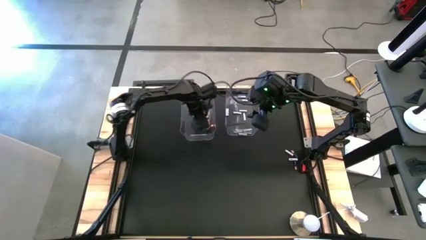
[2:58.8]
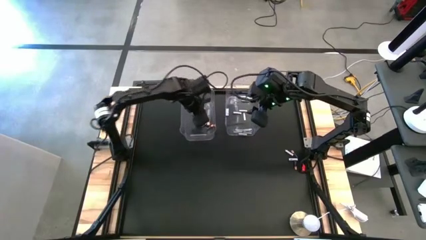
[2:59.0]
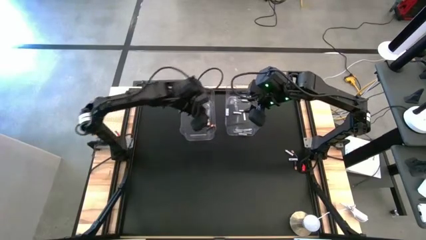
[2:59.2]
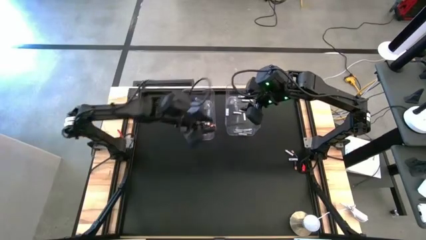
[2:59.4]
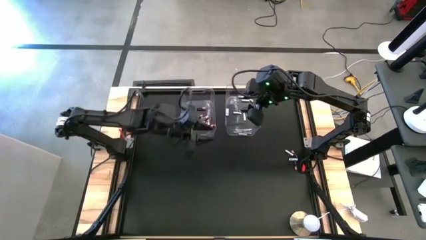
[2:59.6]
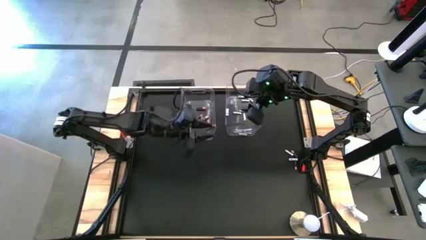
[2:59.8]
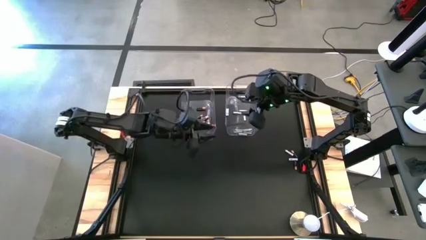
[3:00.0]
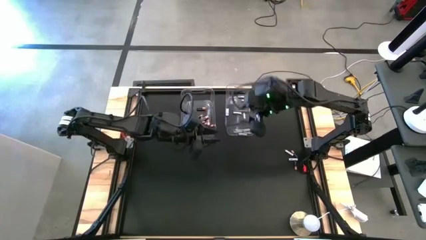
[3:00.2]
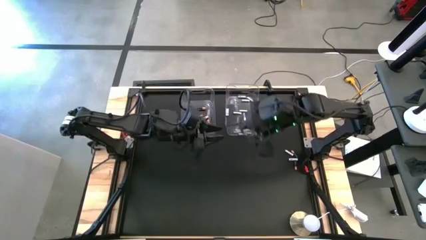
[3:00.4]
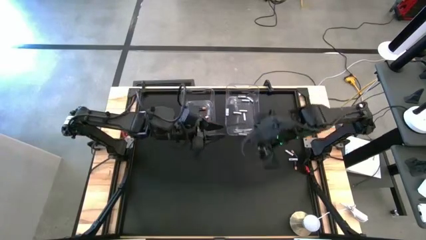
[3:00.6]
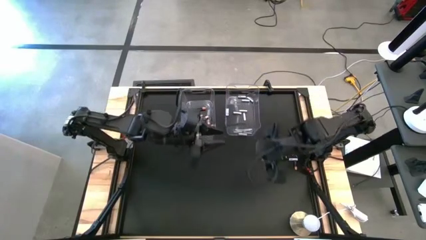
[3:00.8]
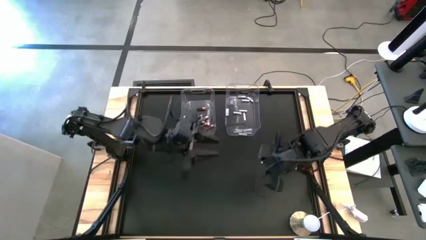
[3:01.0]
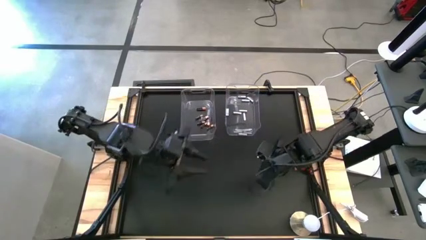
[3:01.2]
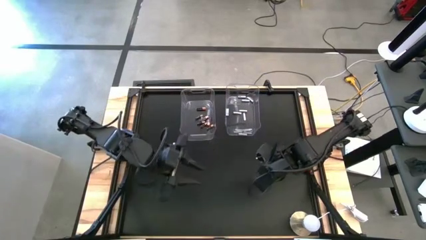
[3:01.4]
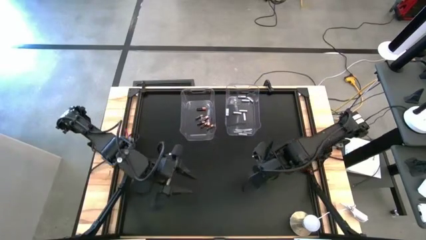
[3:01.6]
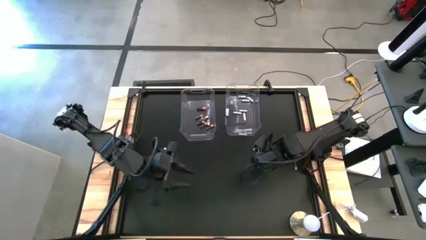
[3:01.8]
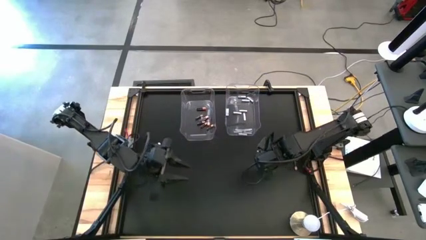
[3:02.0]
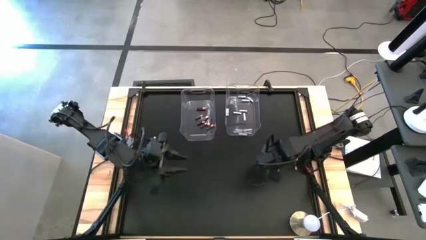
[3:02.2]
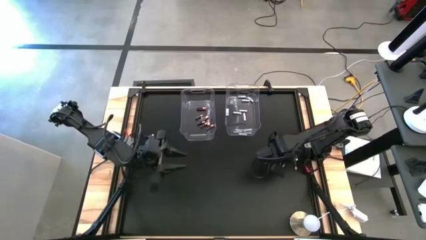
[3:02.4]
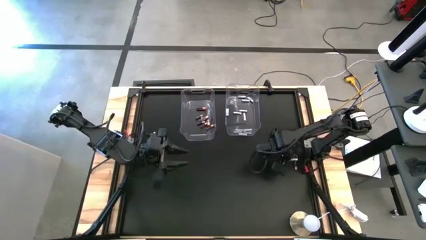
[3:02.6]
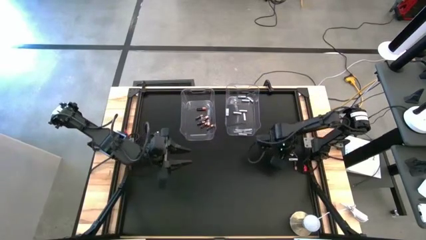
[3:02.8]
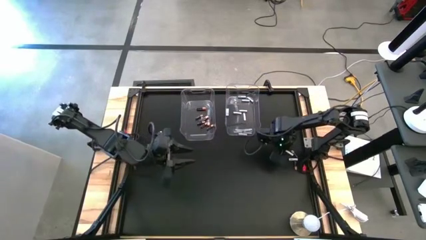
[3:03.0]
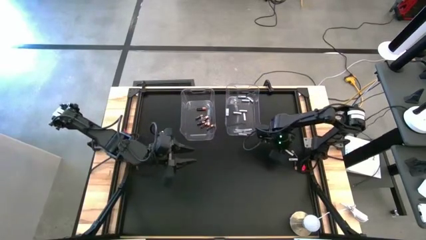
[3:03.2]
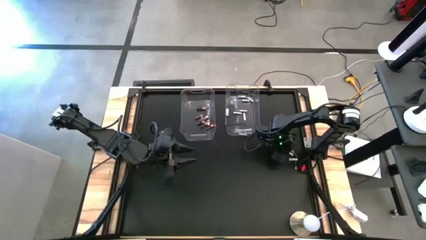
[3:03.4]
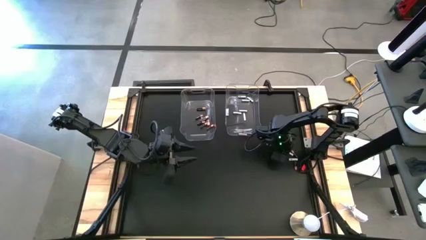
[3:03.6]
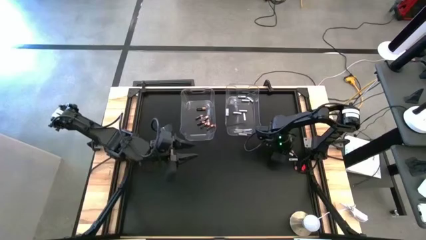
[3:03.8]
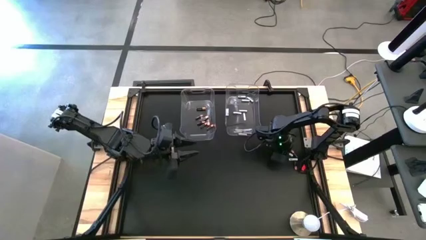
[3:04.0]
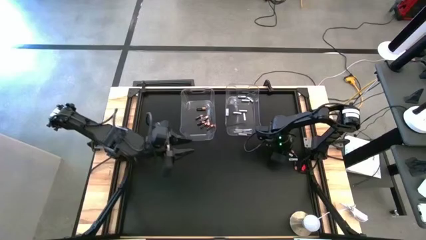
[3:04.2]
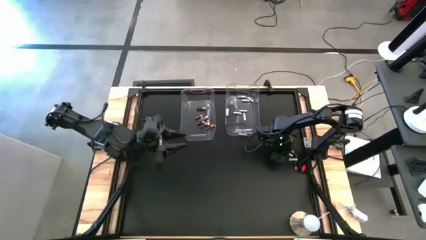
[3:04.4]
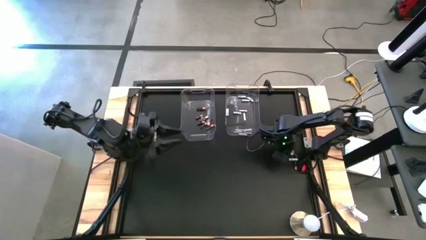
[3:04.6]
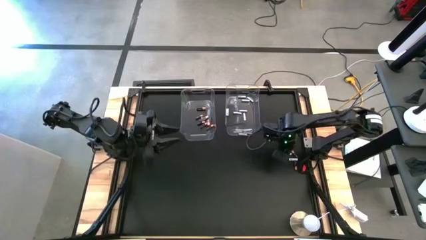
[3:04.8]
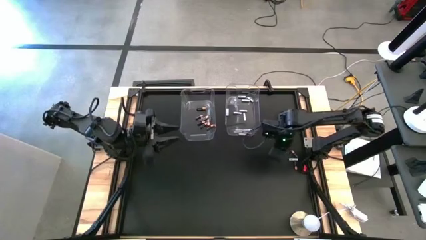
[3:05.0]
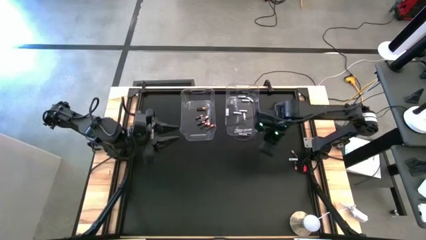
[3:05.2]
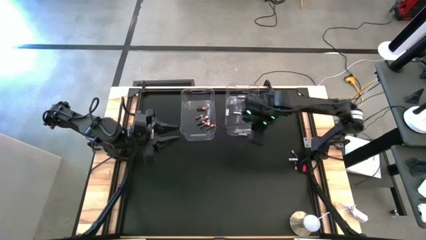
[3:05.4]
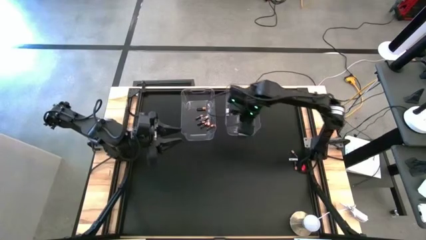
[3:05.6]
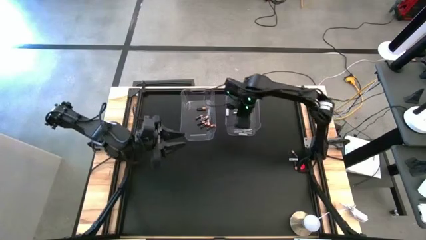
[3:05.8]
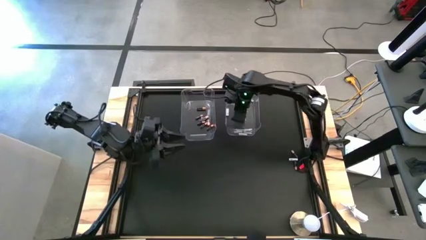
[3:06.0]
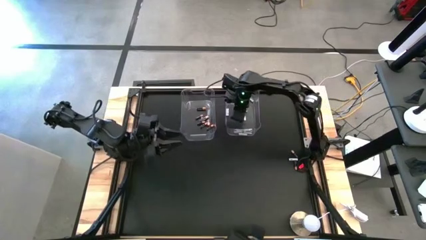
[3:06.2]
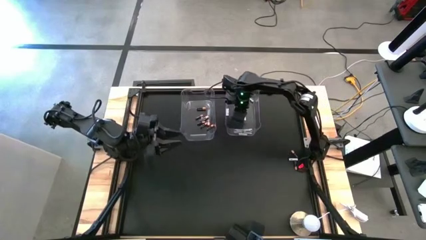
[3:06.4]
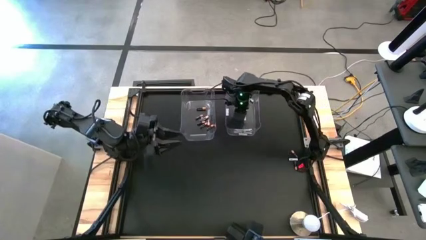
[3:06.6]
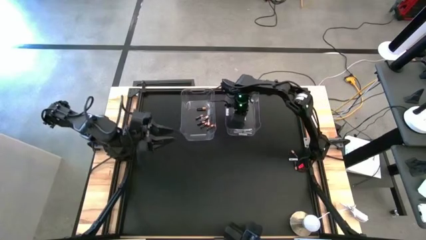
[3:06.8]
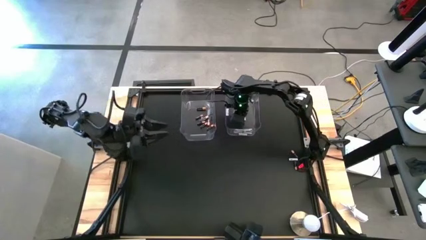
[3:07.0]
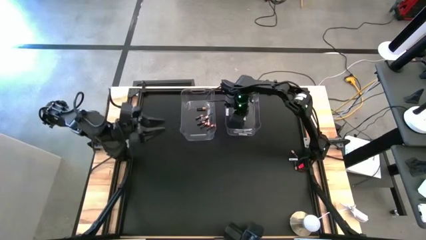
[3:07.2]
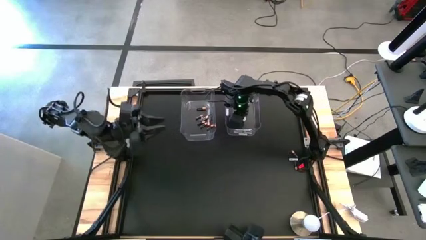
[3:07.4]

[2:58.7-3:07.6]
Task: Sort batteries
Put the white battery into the right transparent bin

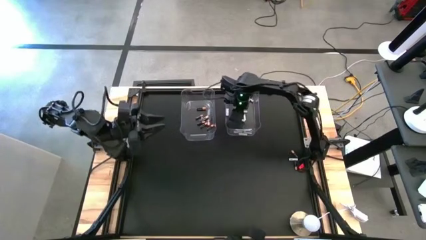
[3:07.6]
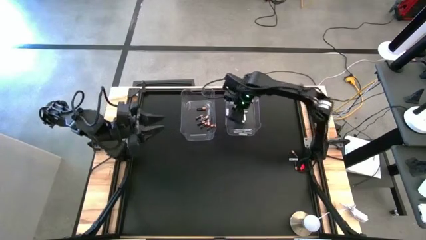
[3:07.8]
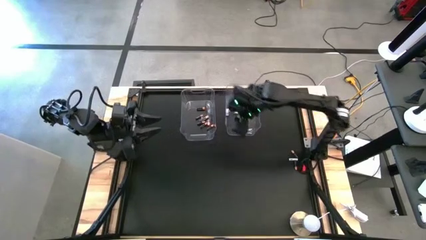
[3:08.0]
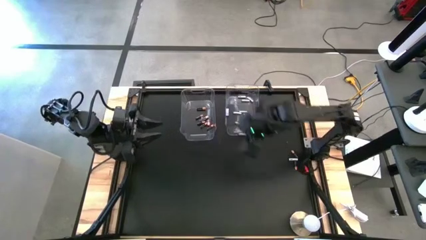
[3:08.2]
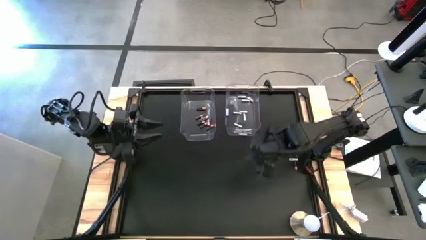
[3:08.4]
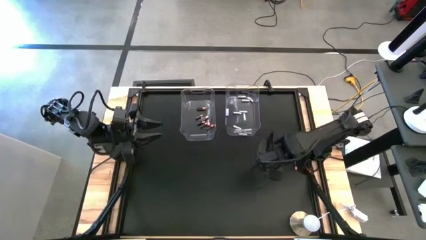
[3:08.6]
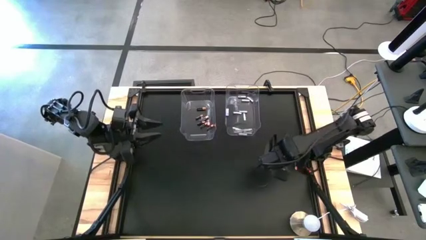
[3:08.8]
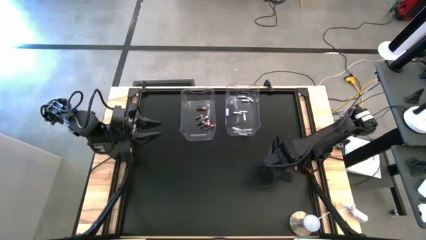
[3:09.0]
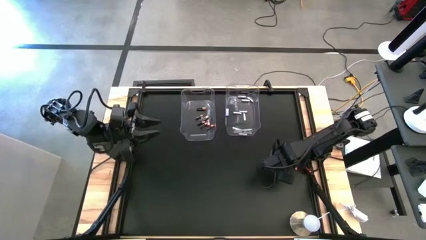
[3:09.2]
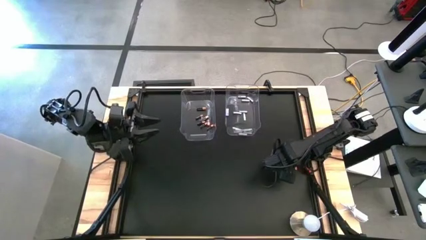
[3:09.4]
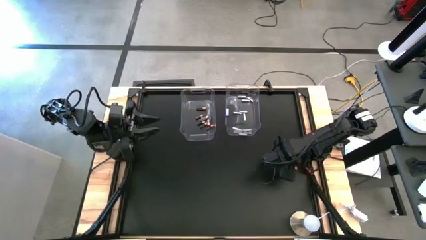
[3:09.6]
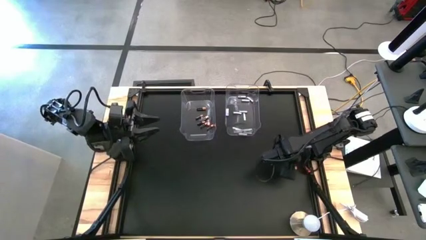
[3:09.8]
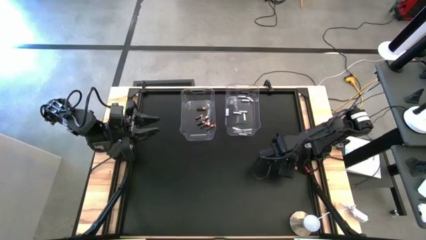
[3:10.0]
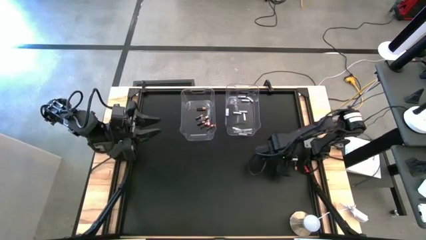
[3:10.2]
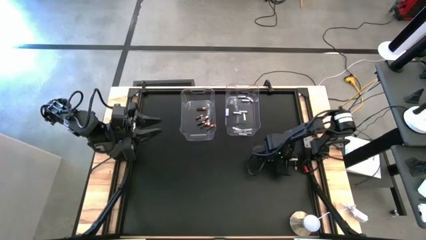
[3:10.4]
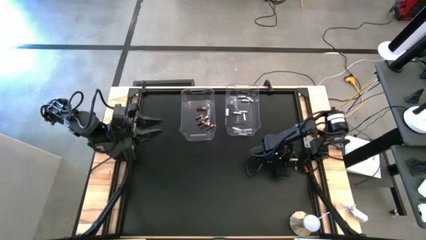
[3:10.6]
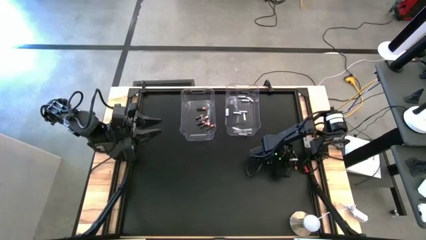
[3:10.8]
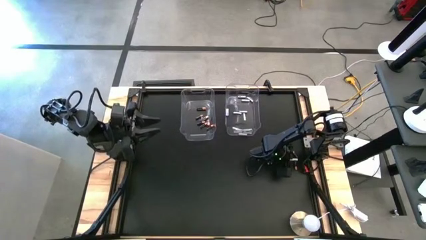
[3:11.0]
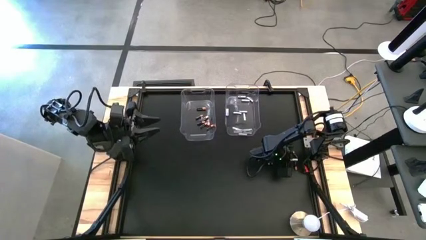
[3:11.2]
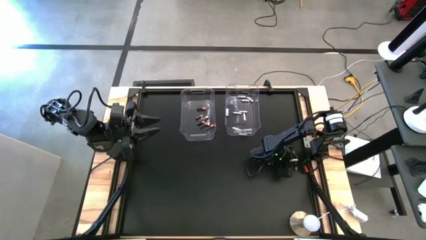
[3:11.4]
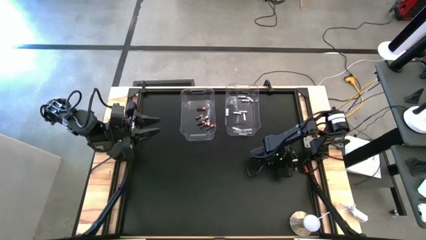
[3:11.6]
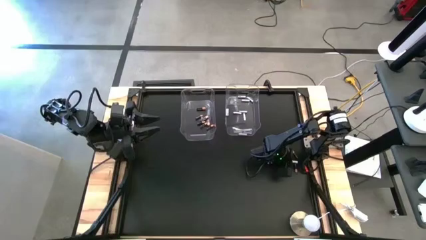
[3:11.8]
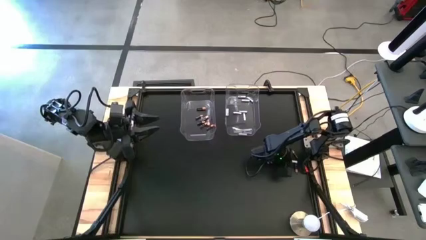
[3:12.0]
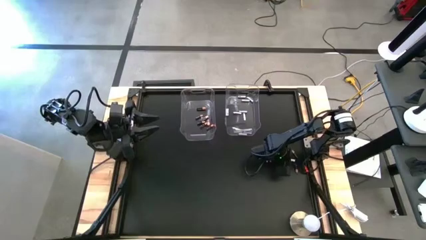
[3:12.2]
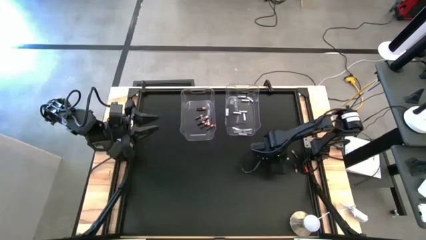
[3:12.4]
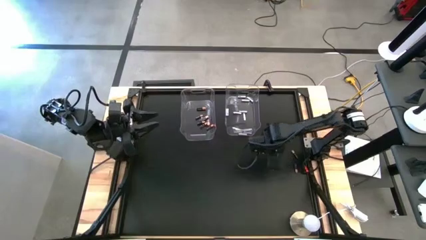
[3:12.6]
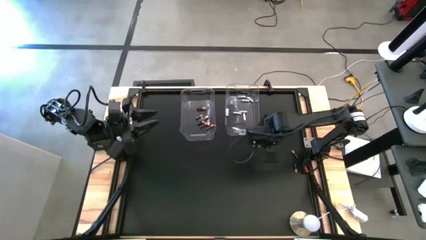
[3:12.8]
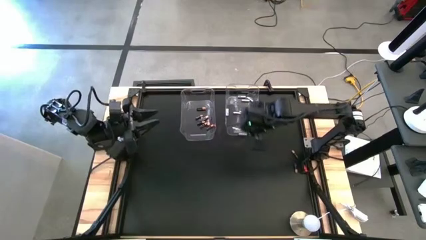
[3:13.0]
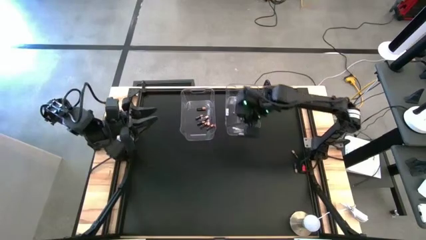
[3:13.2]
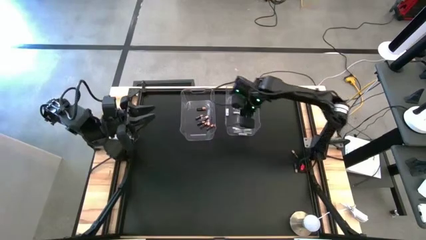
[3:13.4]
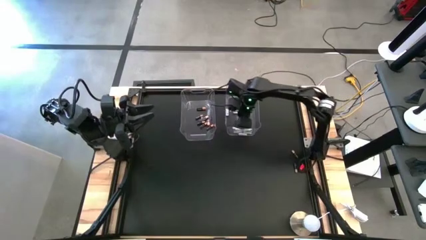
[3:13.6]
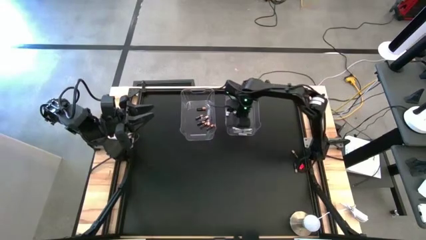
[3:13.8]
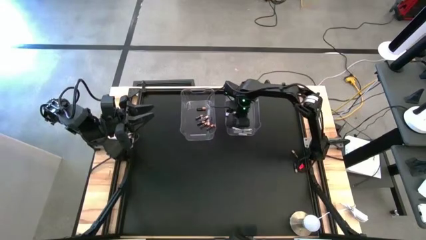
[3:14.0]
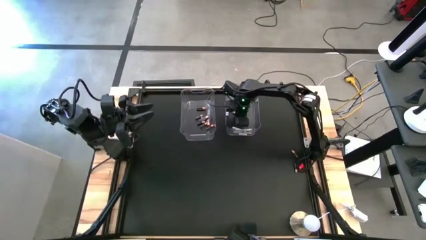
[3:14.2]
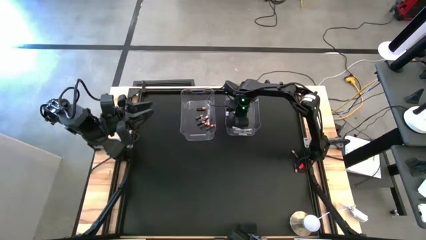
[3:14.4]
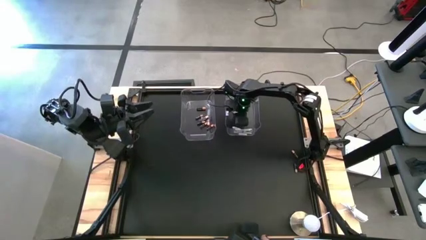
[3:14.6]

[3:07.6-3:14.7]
Put the white battery into the right transparent bin
